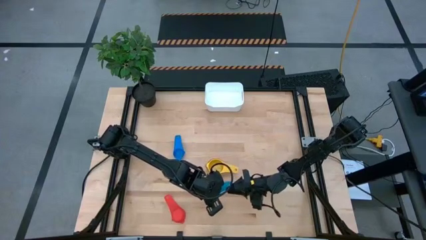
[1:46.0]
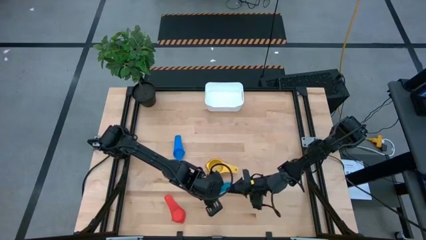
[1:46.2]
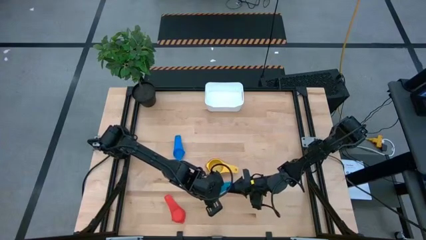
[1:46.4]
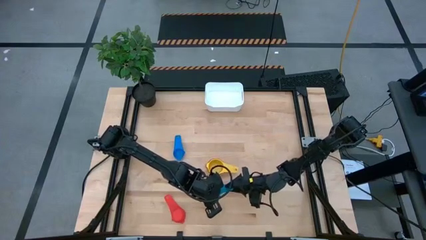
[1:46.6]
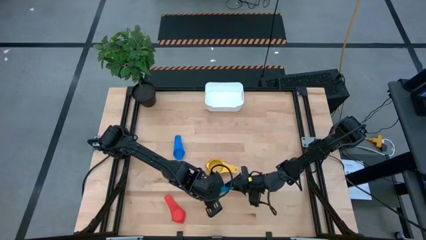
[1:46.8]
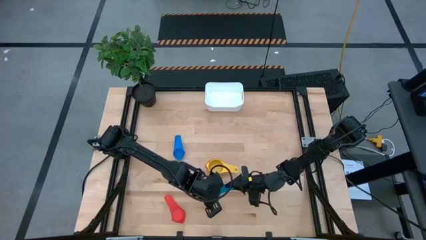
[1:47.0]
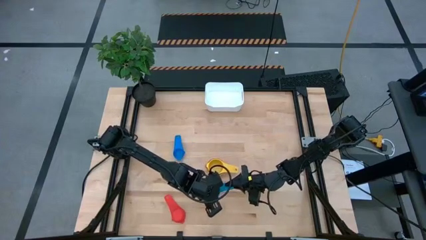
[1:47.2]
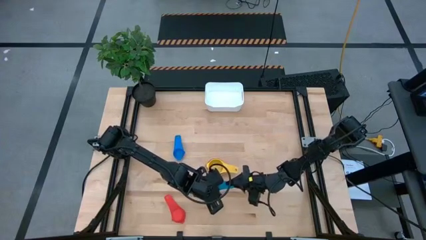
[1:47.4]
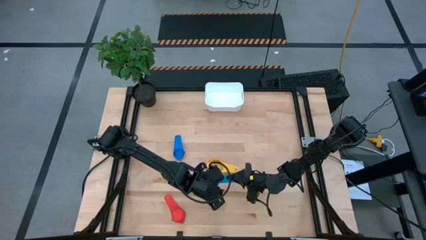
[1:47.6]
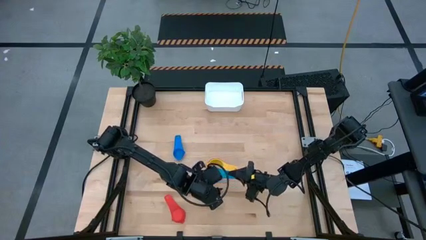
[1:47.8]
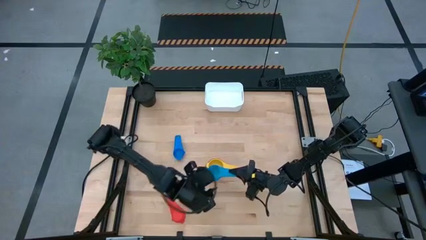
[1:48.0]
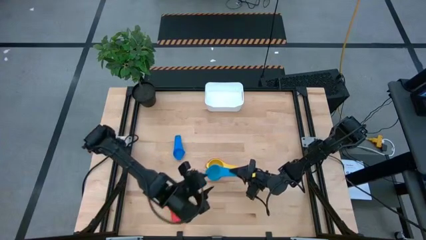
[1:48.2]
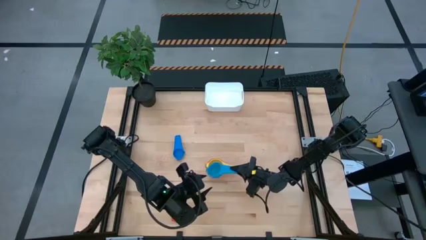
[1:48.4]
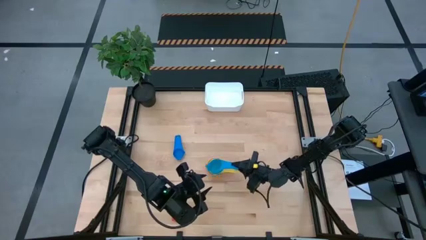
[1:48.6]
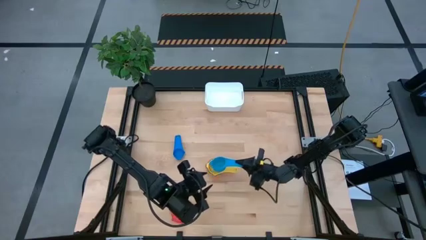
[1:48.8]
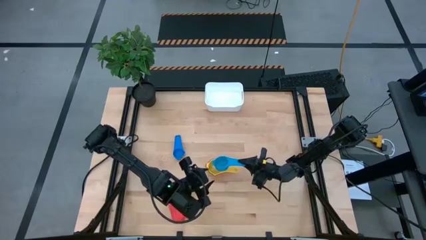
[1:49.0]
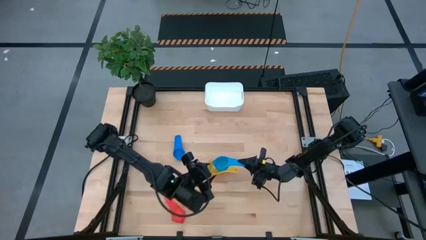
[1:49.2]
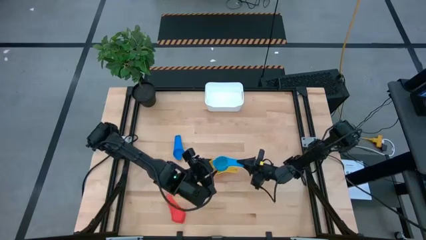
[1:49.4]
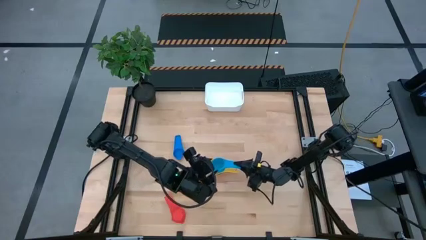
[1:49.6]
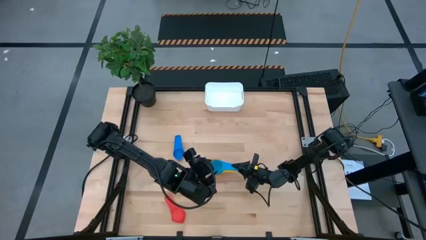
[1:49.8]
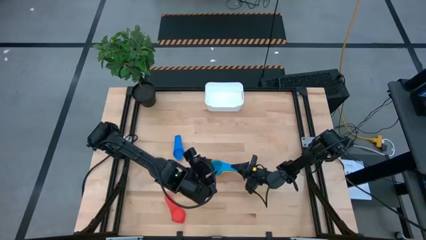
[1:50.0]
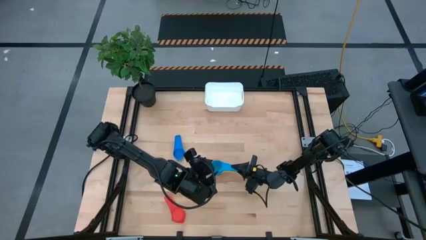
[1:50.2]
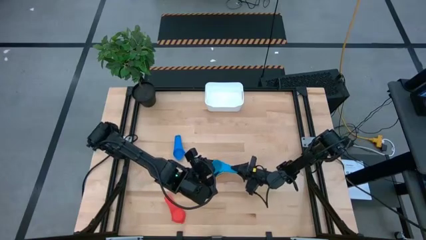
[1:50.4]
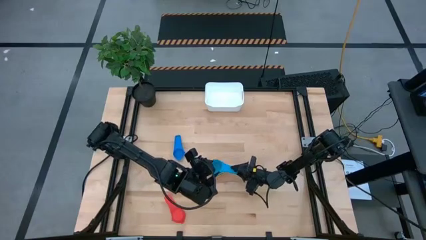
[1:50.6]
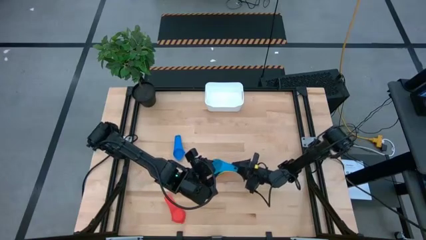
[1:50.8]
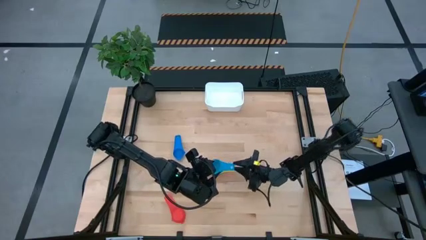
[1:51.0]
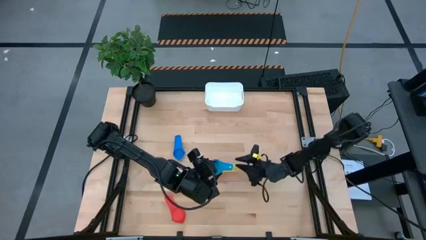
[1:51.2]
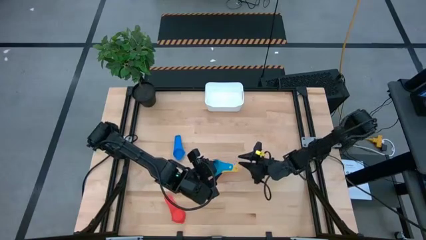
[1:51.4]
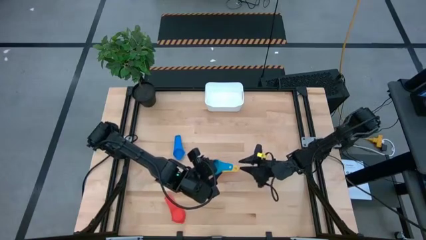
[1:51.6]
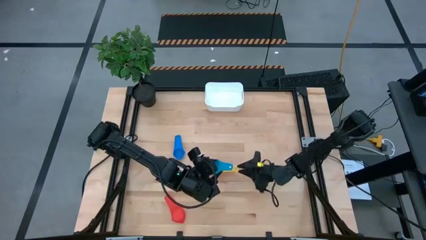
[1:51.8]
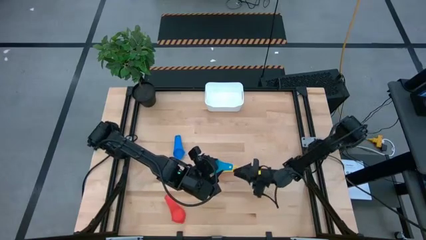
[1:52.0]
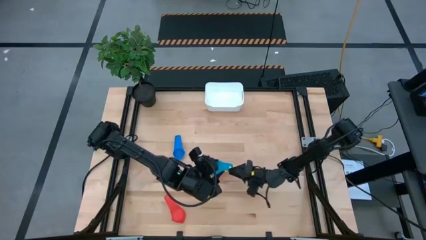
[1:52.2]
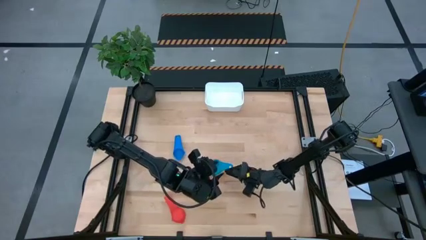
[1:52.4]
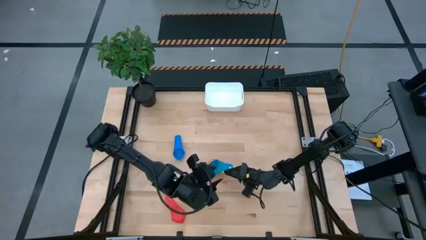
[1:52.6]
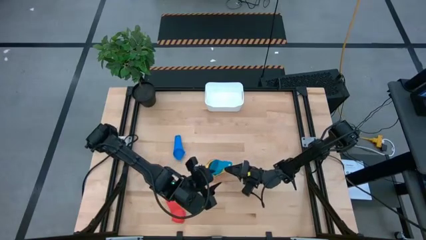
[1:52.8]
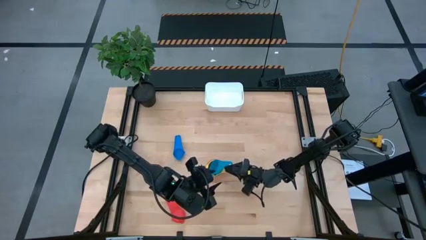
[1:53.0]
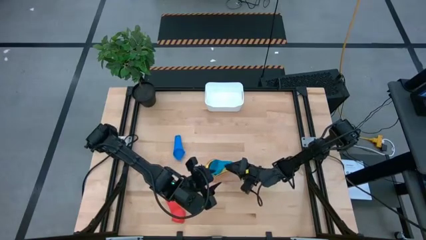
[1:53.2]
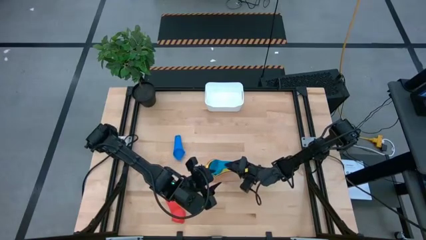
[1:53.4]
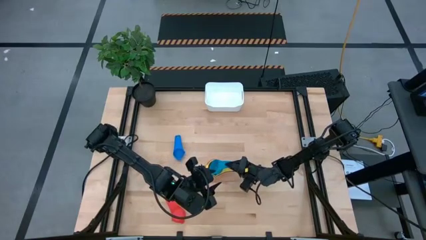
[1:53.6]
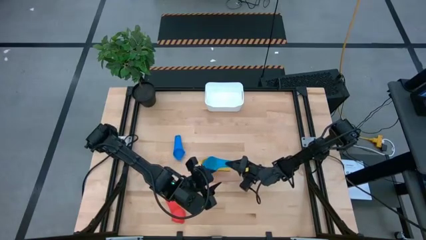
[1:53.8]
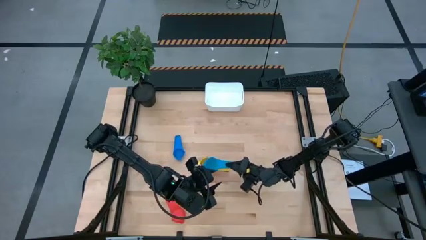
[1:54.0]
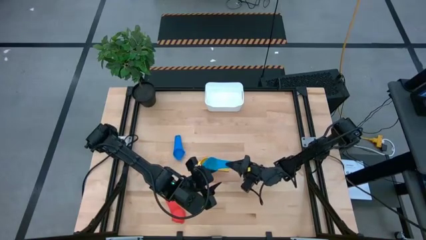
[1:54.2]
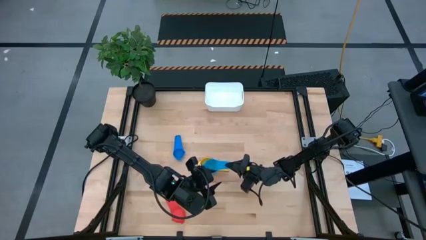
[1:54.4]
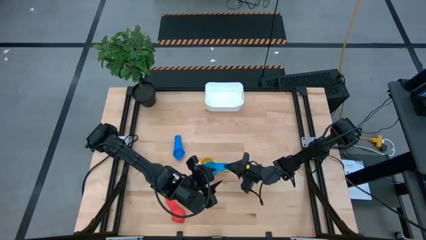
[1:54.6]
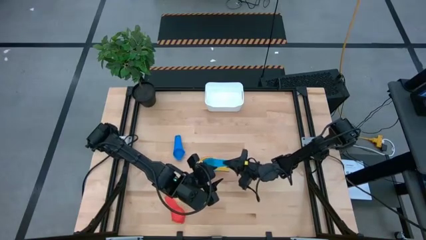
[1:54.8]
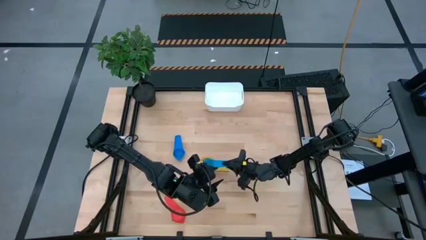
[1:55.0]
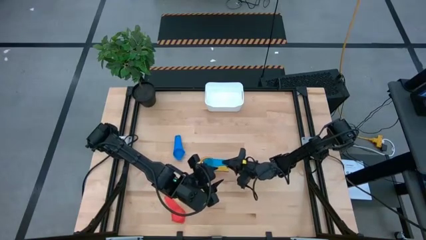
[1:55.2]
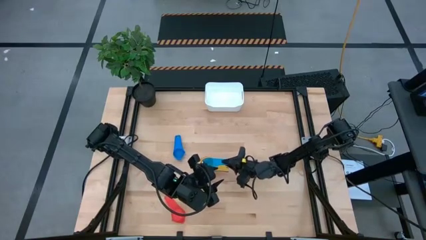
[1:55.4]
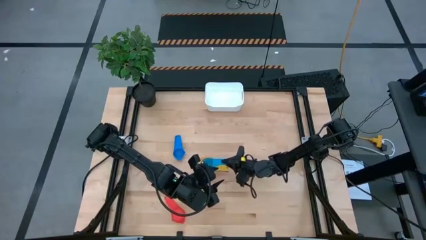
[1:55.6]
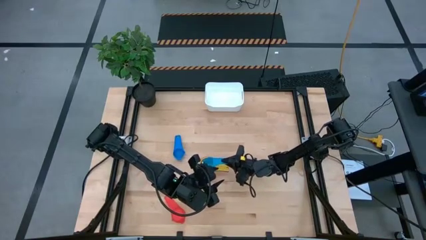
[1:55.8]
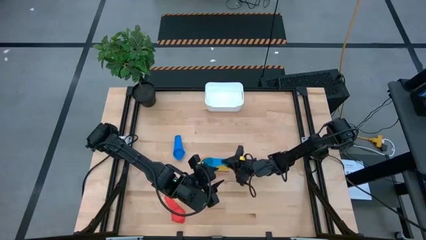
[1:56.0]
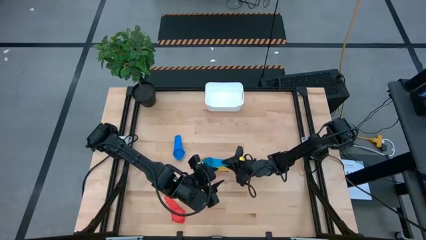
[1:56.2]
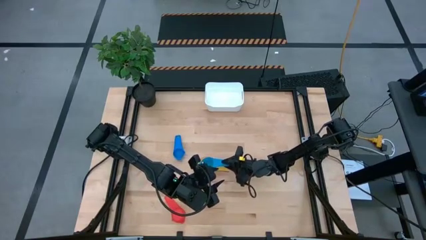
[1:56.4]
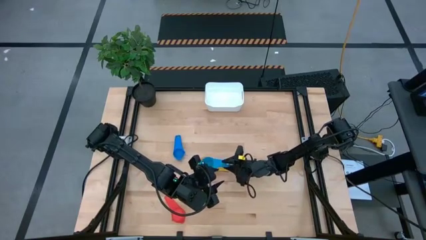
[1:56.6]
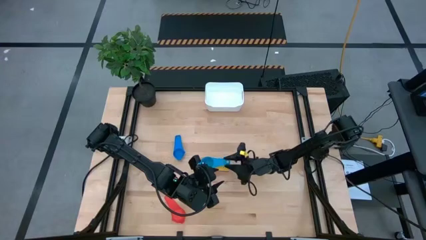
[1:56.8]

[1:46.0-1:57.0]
Task: Nest measuring cups in basket
Stack the light blue measuring cup on top of the yellow measuring cup

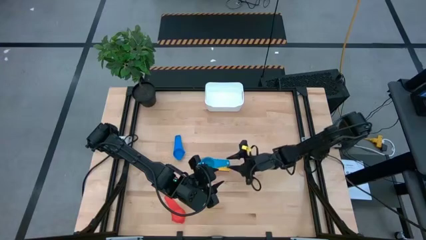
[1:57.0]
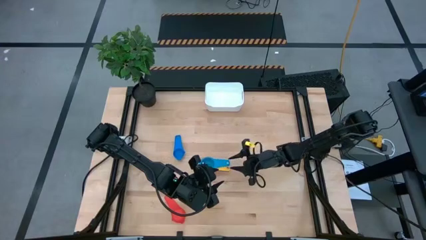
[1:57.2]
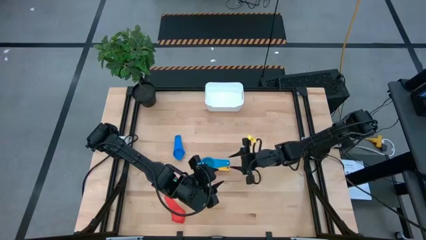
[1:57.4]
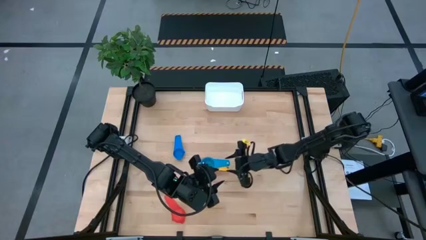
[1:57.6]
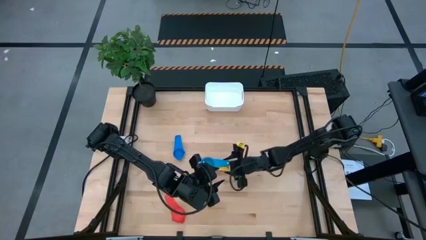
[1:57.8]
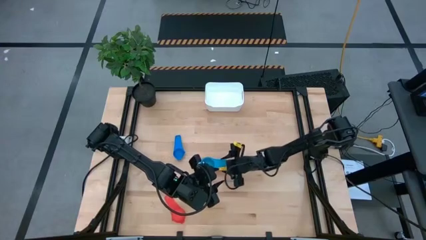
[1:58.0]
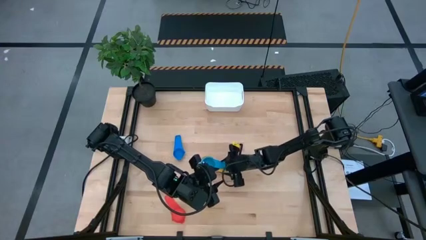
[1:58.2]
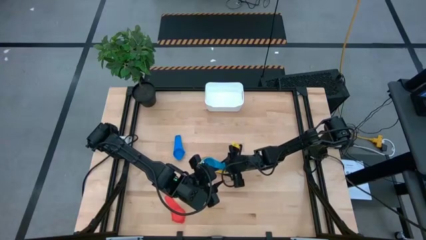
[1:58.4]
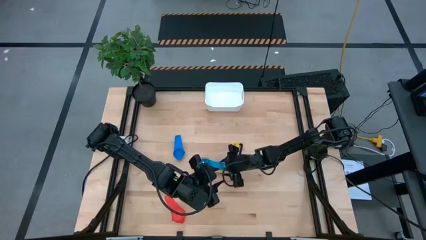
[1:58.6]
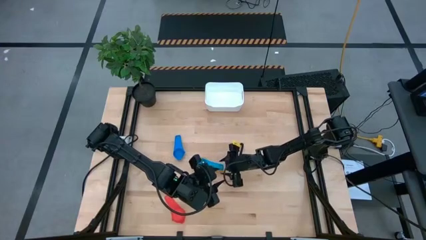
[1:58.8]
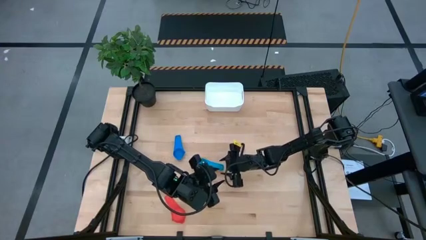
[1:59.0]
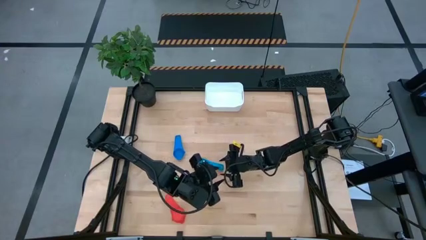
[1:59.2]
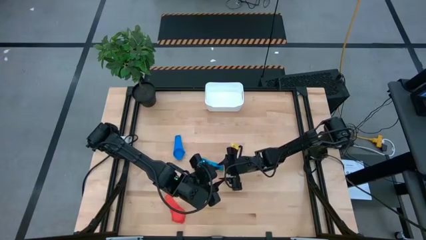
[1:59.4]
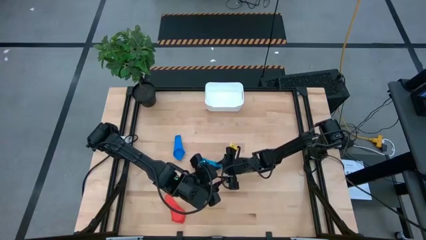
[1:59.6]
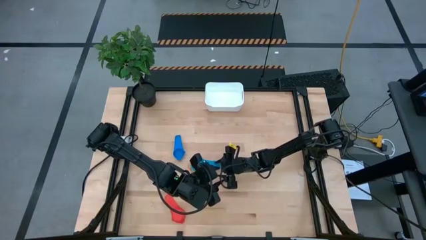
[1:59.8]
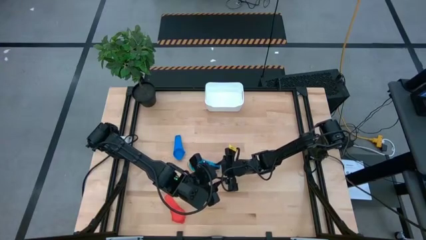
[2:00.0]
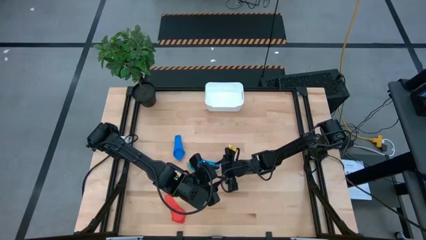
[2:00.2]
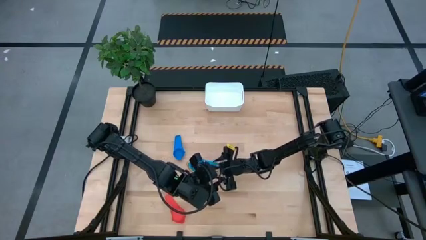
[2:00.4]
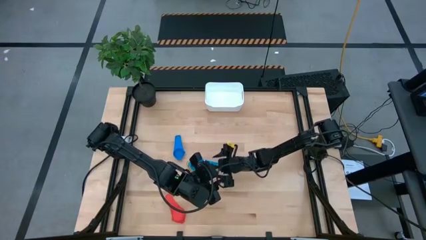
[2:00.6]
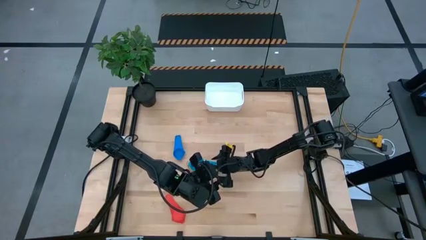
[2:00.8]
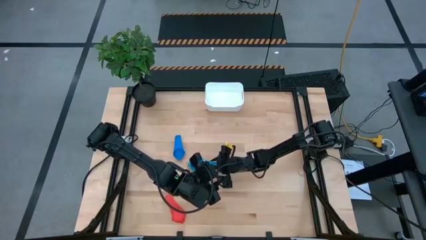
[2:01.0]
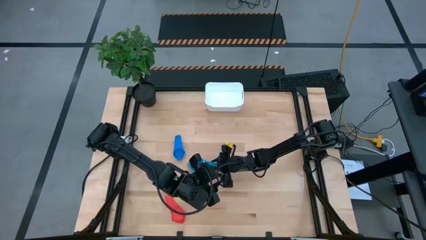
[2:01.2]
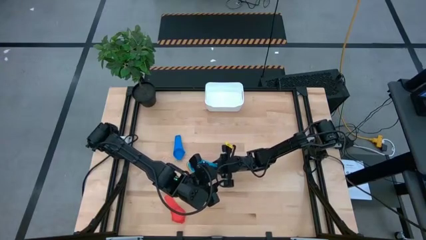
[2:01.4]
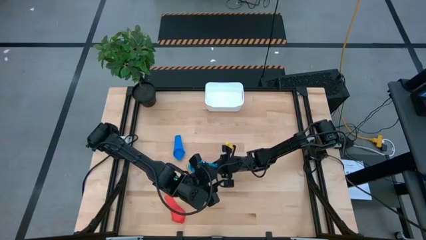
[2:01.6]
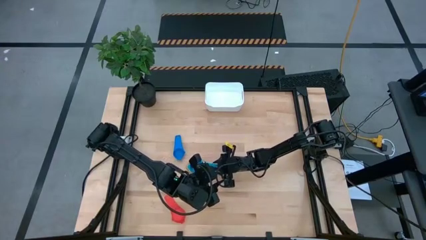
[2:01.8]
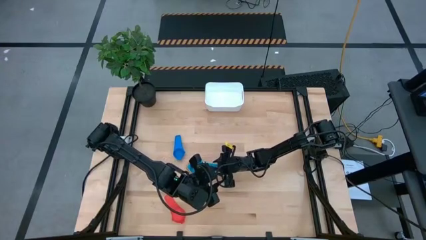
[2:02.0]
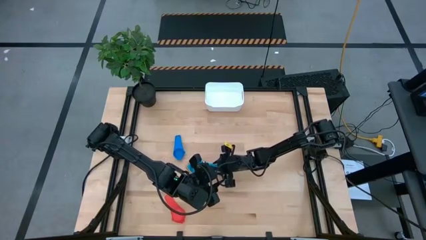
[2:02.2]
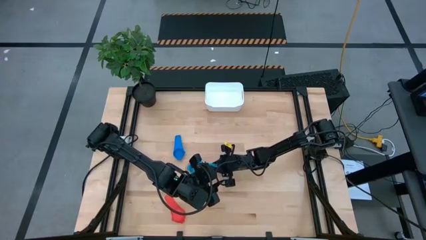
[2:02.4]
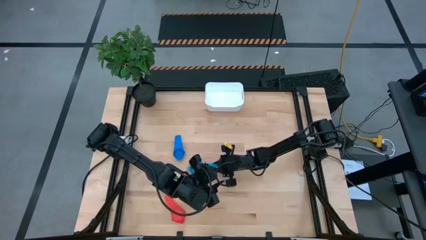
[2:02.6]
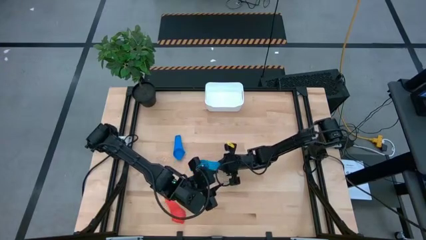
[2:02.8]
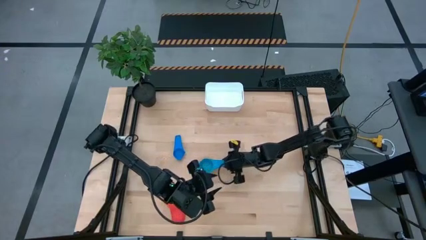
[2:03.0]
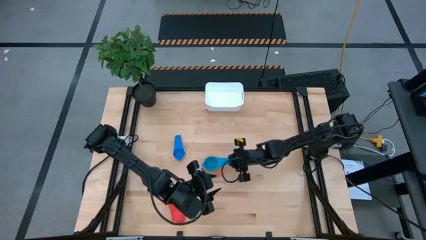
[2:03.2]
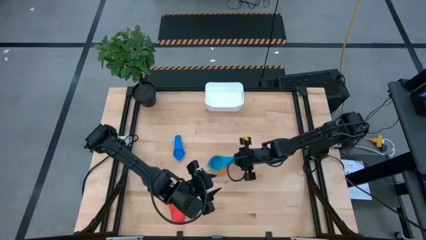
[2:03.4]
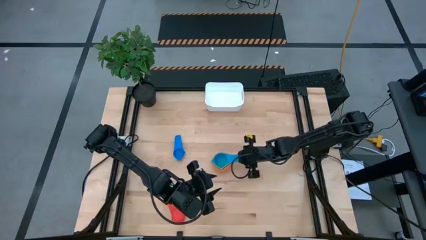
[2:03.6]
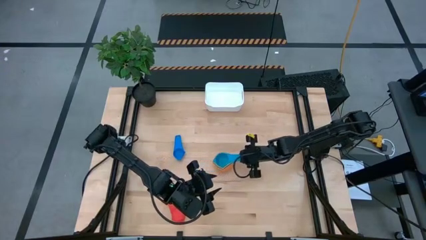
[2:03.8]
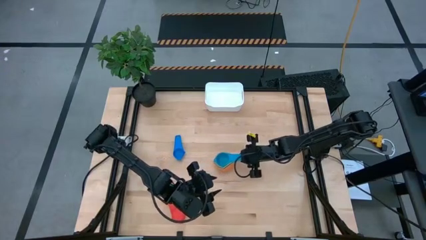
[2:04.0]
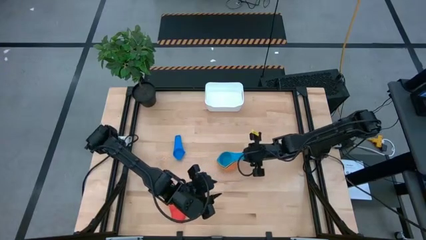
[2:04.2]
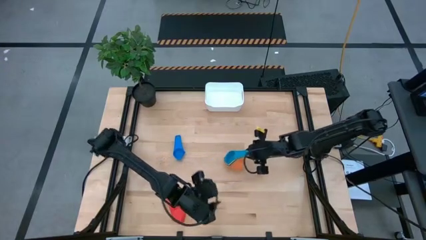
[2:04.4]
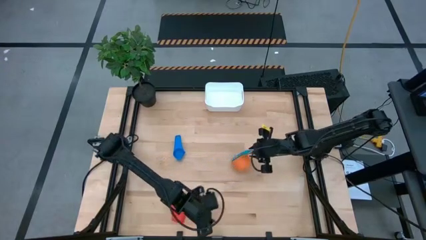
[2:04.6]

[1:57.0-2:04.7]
Stack the light blue measuring cup on top of the yellow measuring cup
